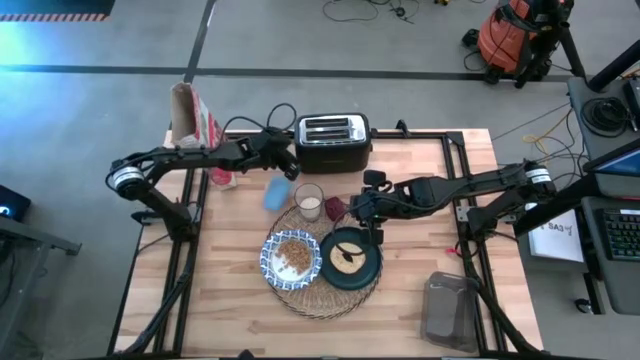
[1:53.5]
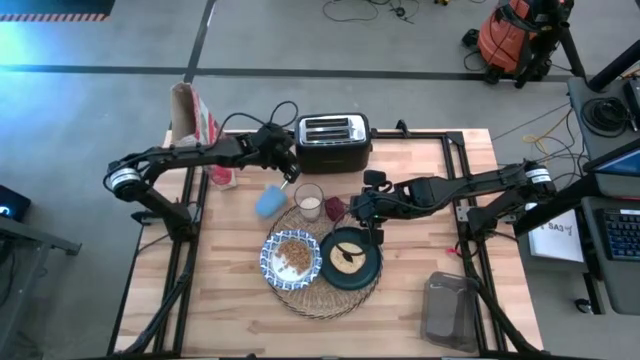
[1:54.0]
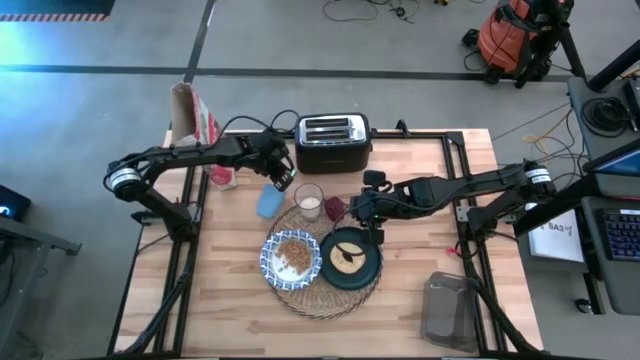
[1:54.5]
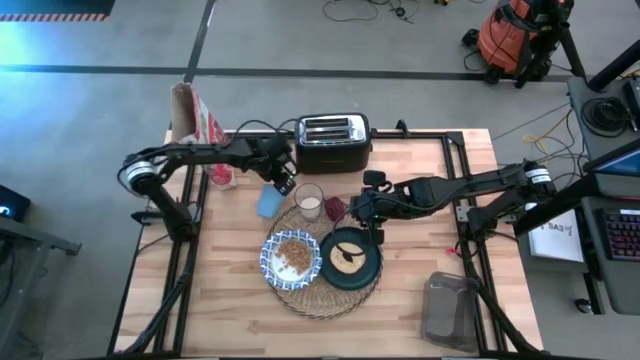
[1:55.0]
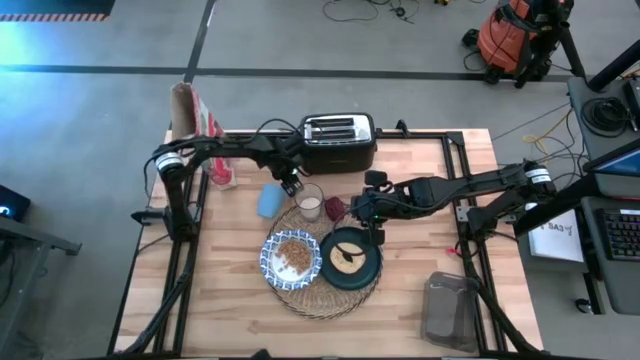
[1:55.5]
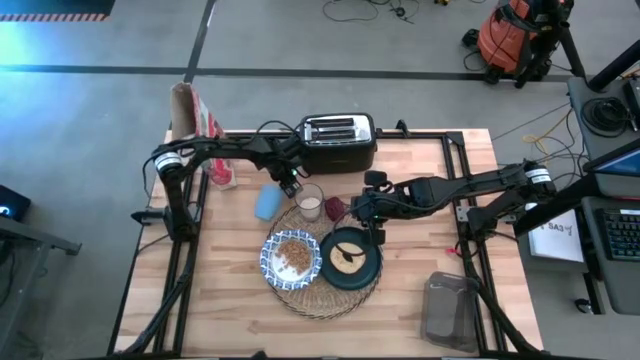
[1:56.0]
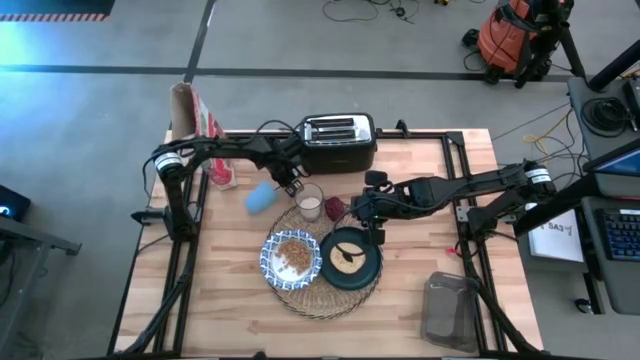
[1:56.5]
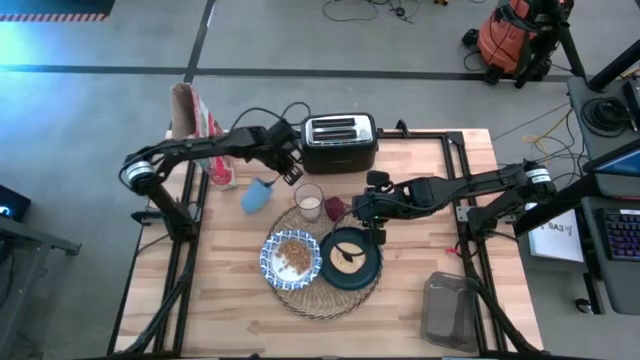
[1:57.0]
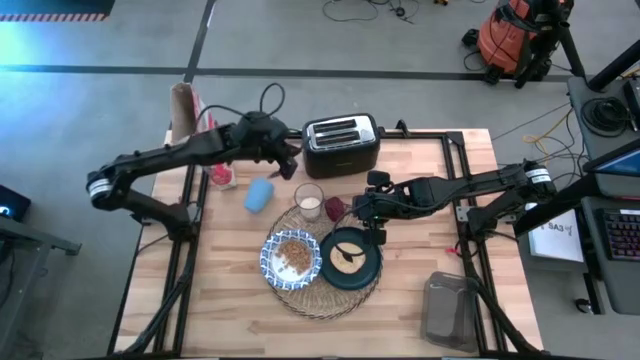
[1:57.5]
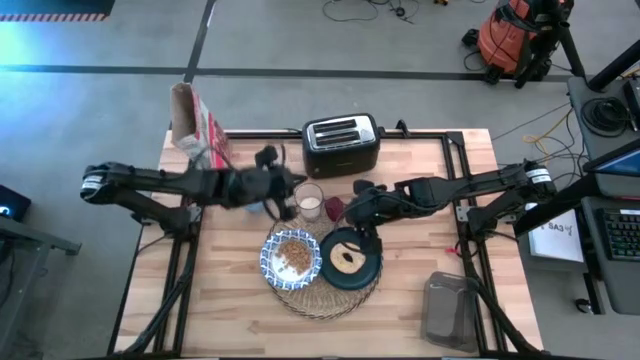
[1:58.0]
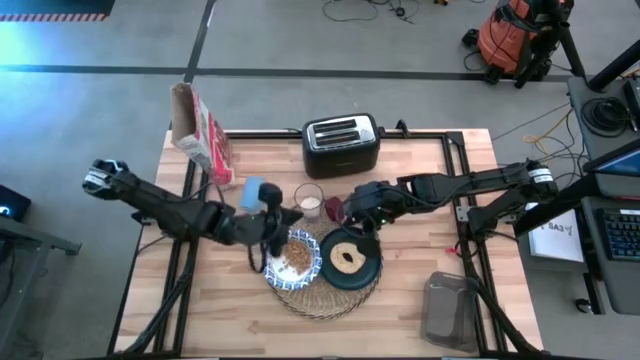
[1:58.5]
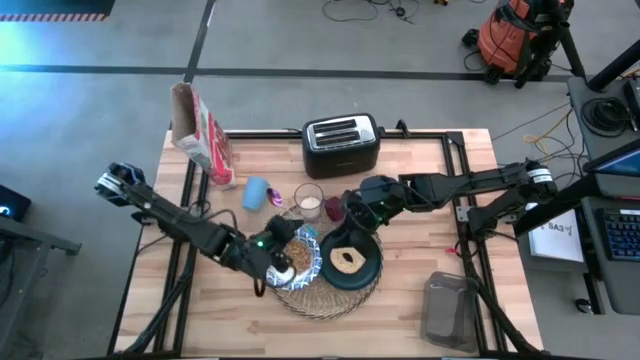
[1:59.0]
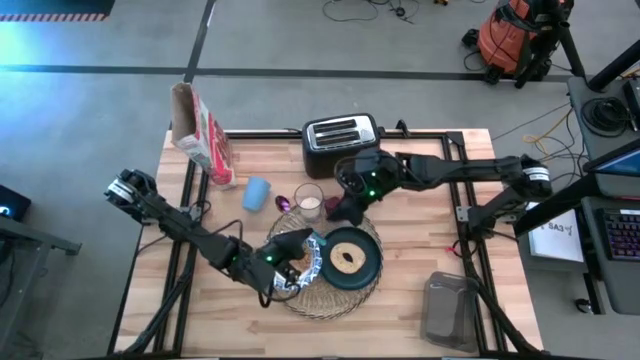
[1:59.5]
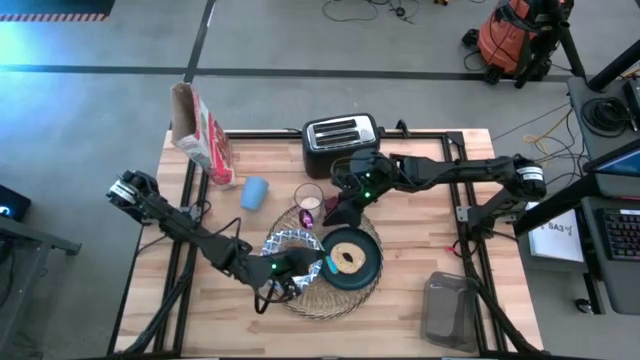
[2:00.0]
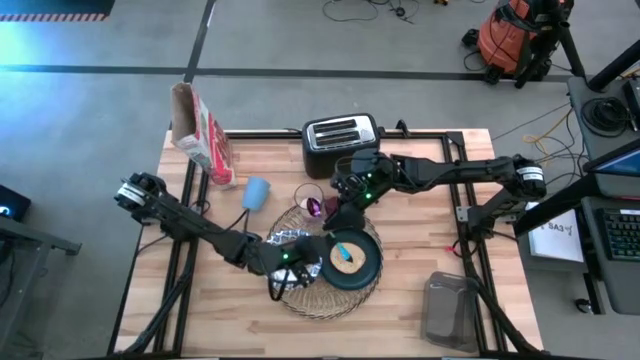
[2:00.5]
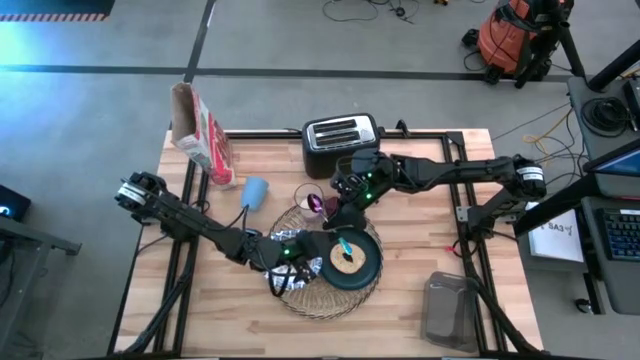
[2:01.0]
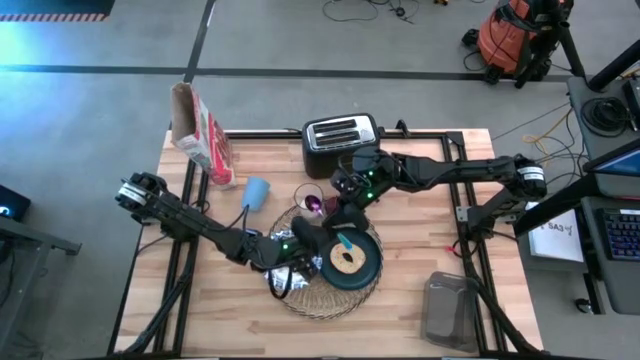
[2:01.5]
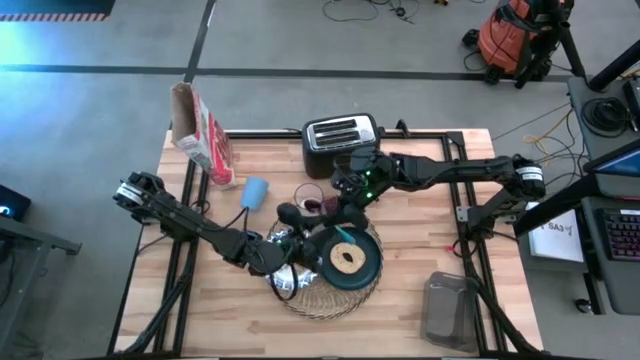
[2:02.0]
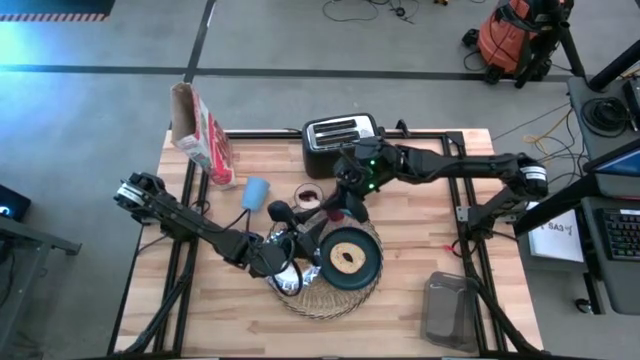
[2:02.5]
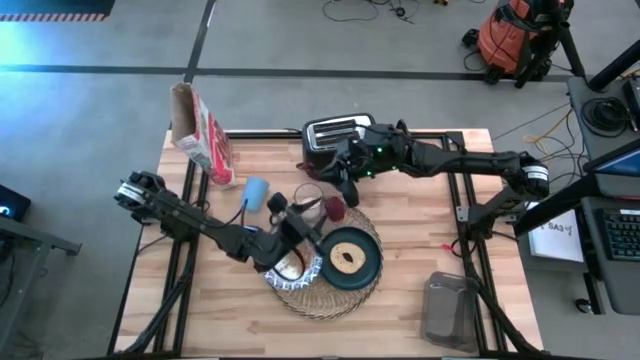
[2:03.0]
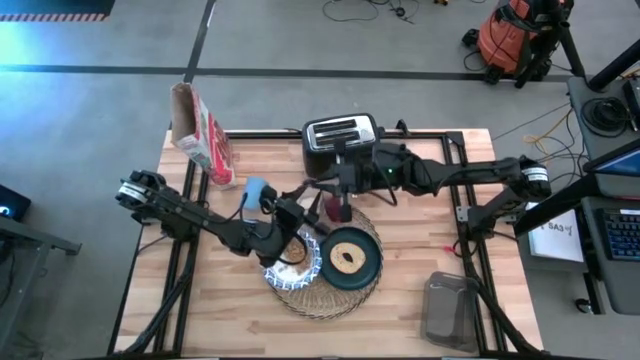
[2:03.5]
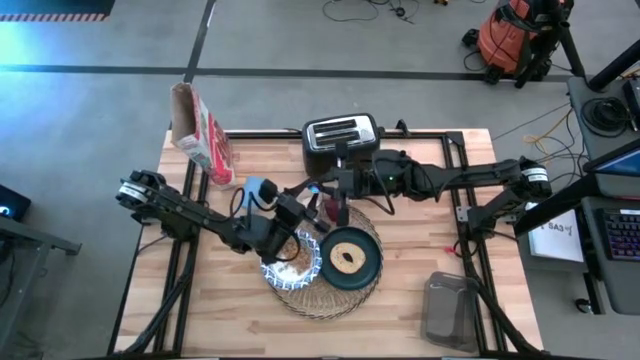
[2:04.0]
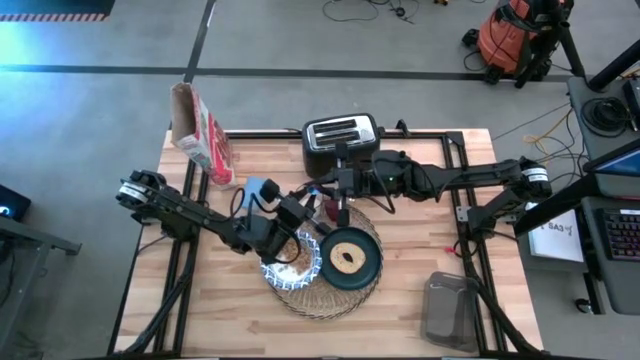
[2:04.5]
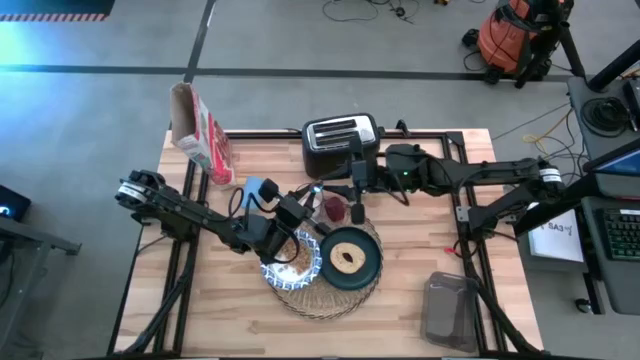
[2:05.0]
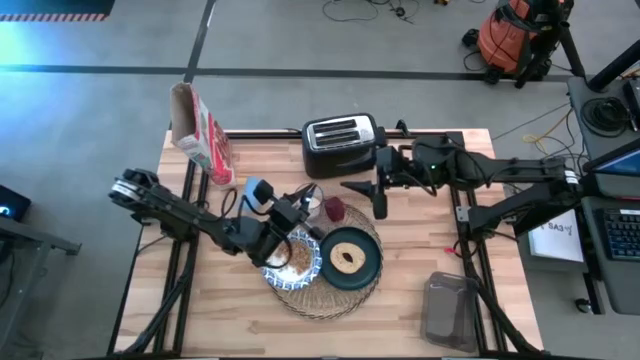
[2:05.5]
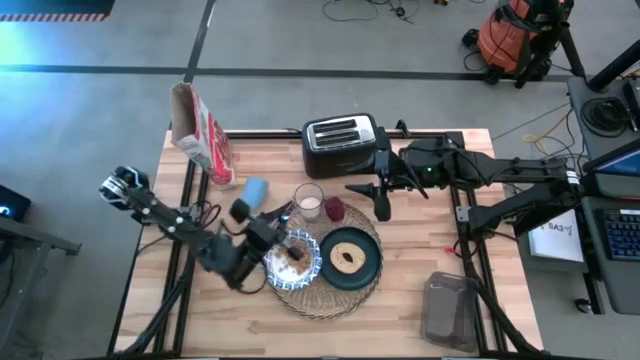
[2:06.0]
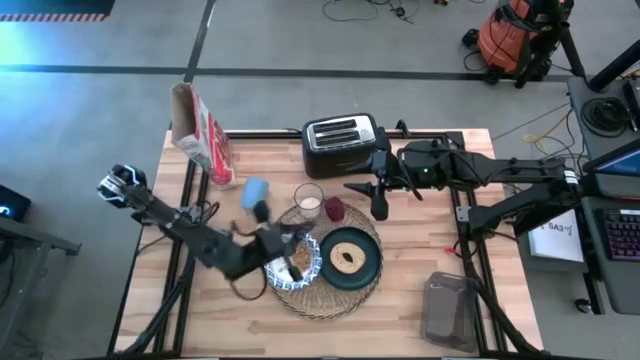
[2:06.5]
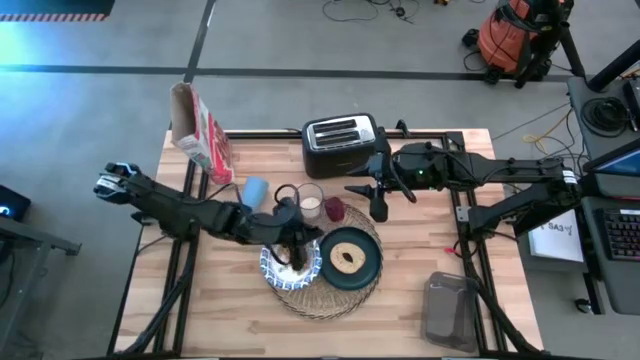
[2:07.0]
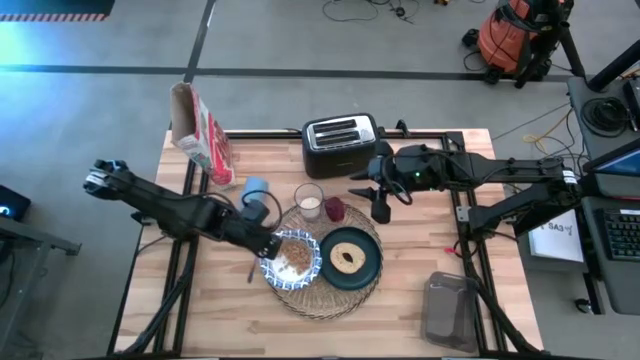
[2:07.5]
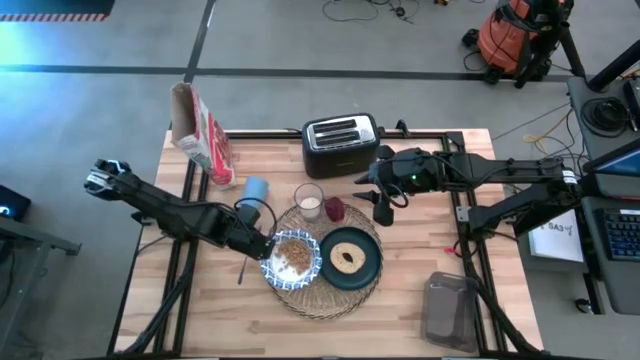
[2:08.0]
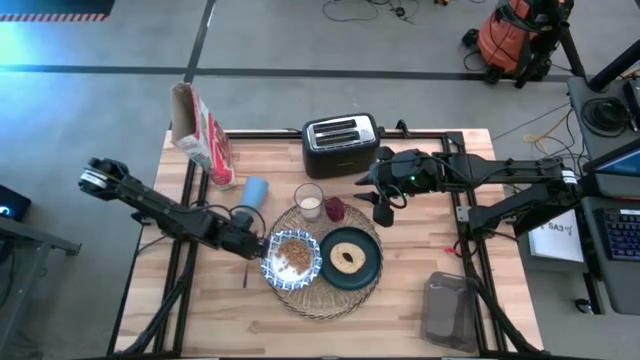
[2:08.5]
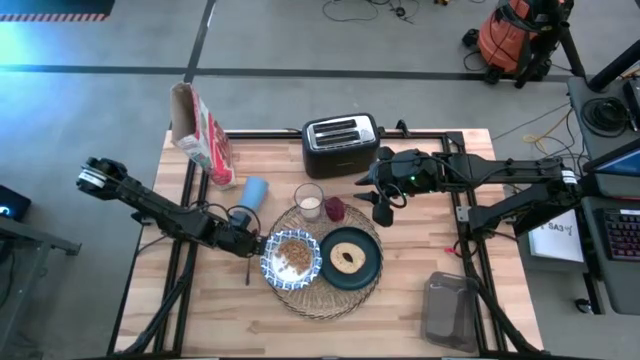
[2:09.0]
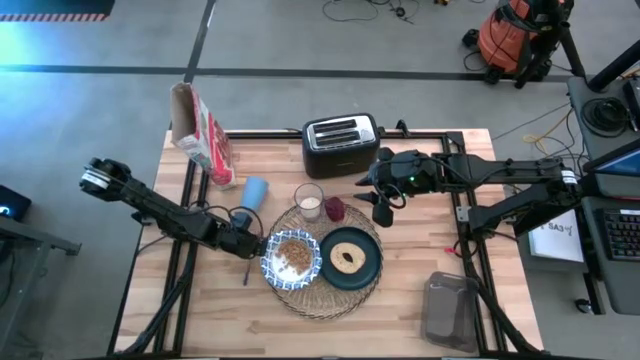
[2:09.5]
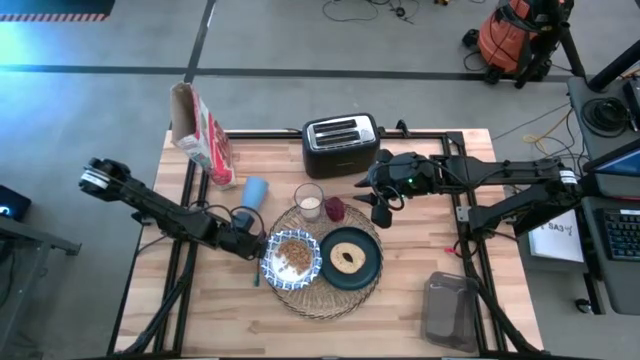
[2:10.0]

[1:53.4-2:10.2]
Task: Arrange a breakfast setting
Move the iridescent spoon to the middle left of the table

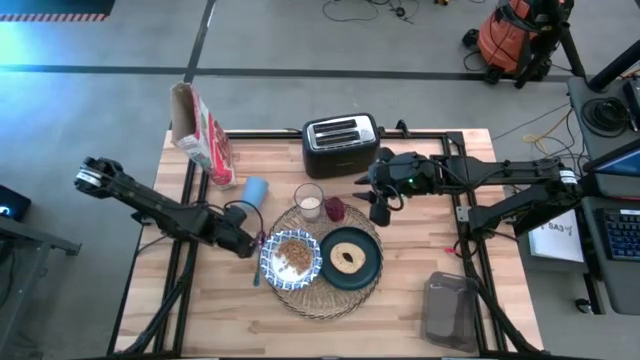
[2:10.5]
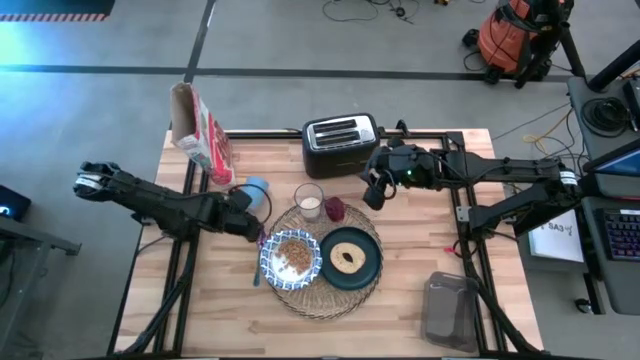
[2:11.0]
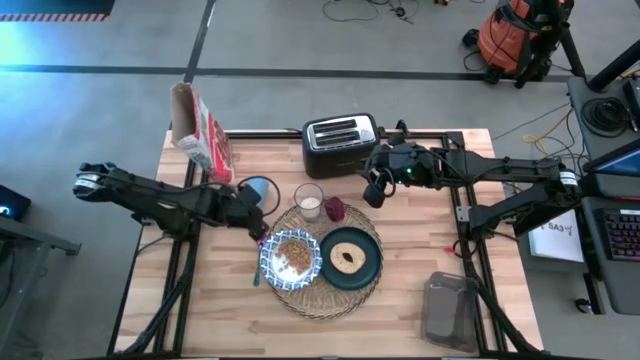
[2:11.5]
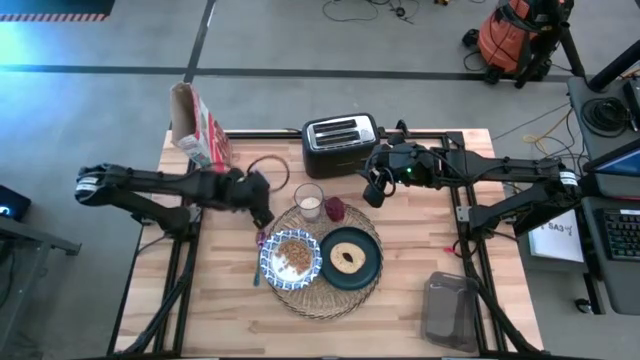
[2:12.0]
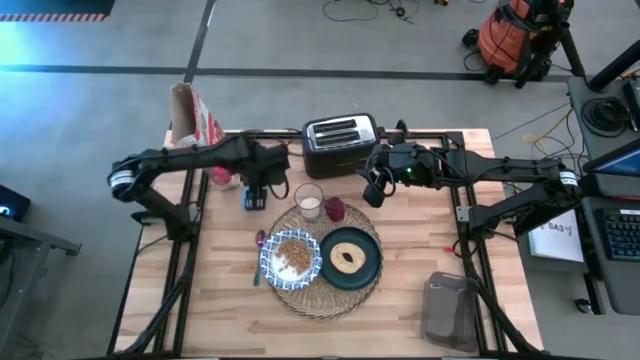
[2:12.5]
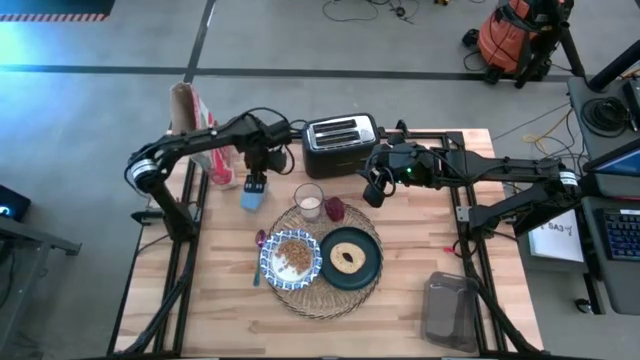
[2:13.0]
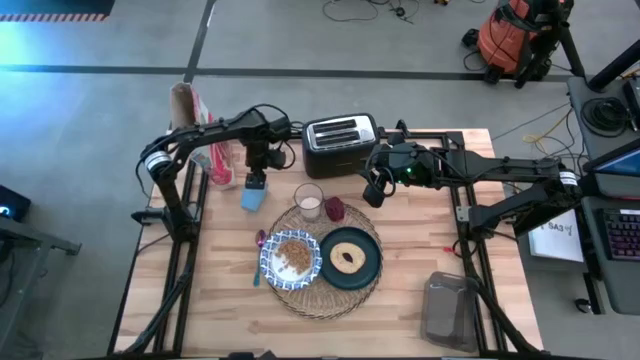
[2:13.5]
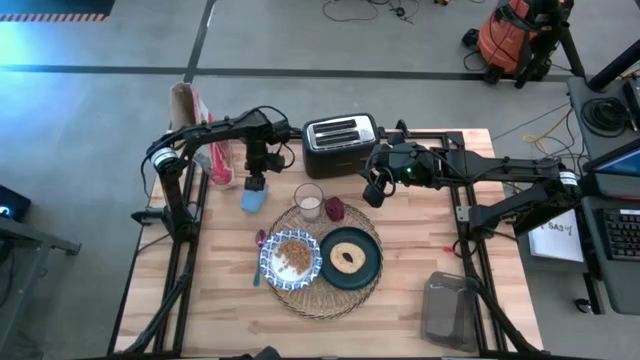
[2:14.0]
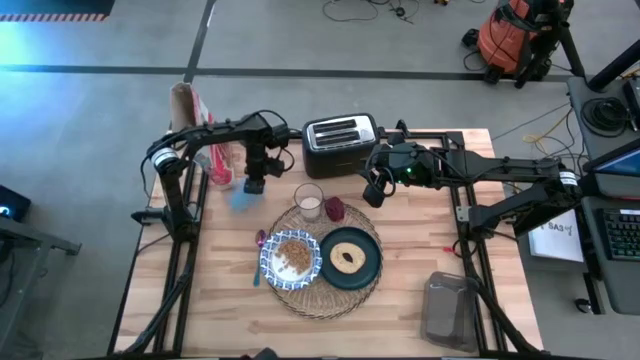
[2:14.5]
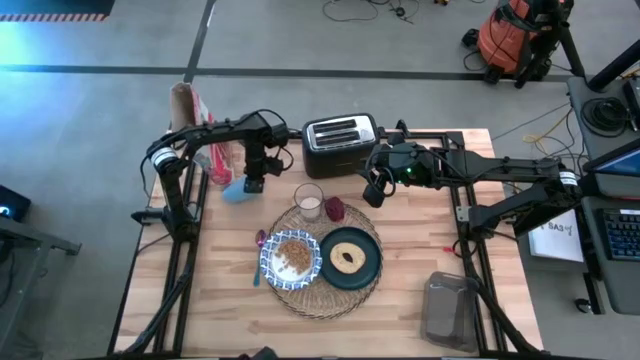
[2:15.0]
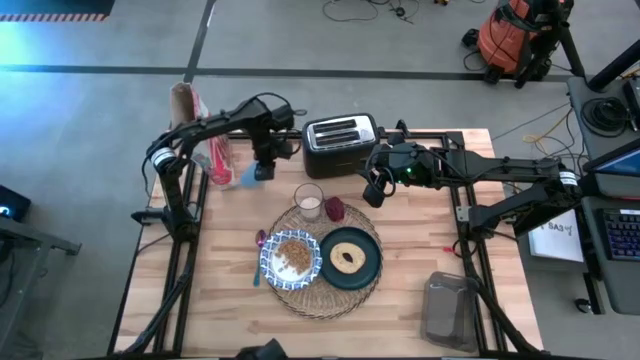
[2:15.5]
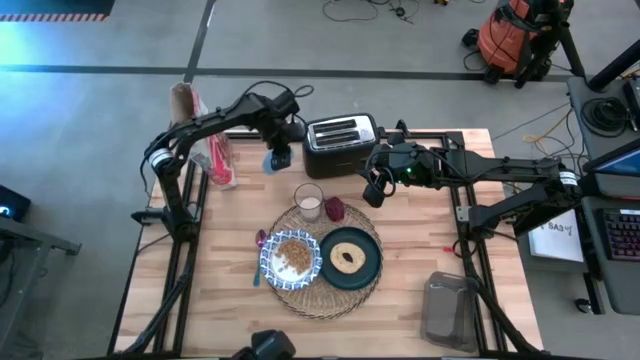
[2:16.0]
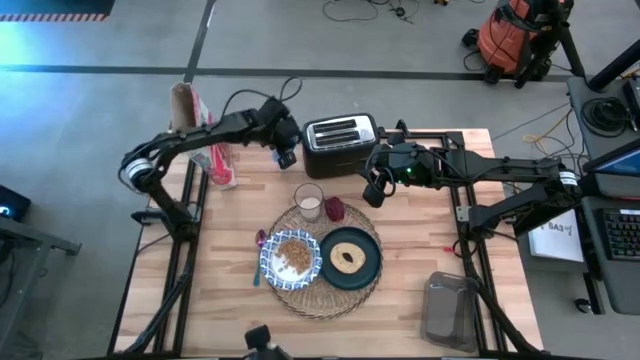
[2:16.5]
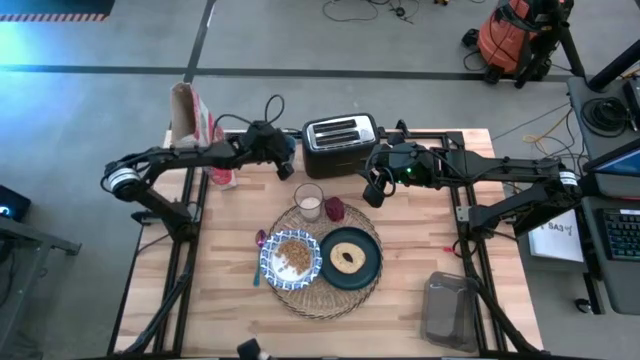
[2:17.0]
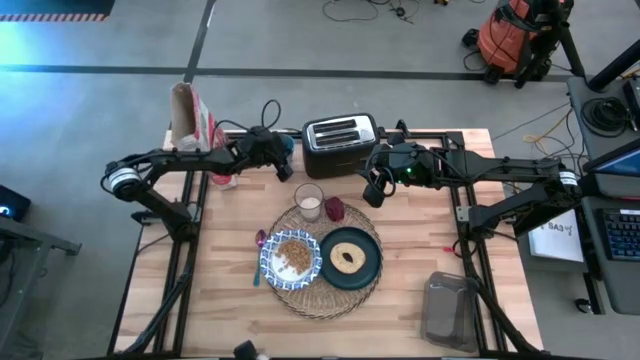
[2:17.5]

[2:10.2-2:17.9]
Adjust the blue cup
